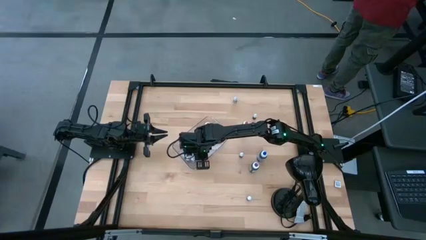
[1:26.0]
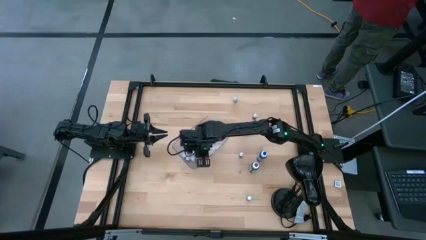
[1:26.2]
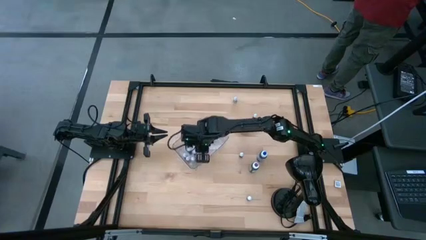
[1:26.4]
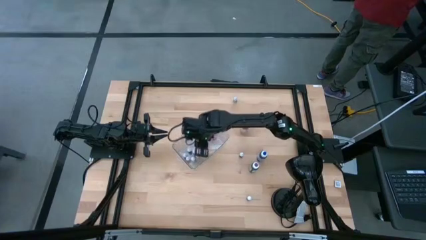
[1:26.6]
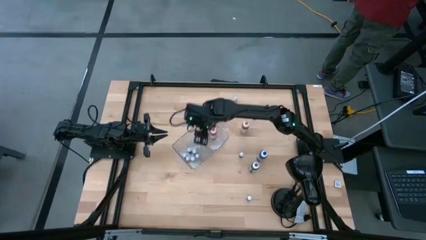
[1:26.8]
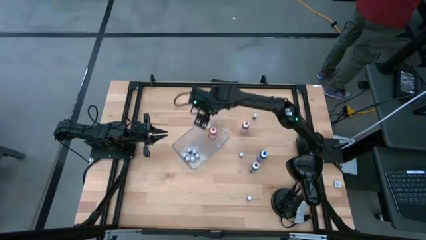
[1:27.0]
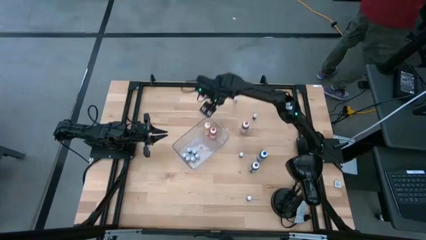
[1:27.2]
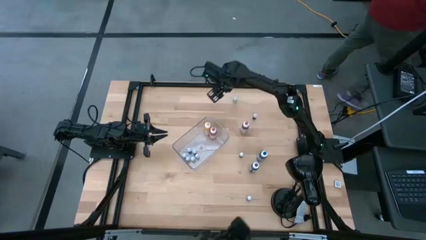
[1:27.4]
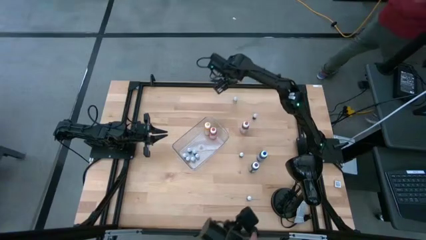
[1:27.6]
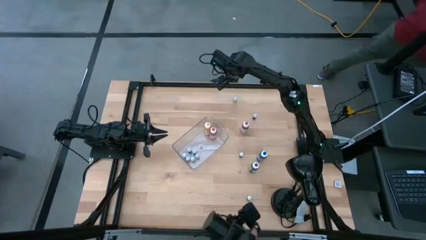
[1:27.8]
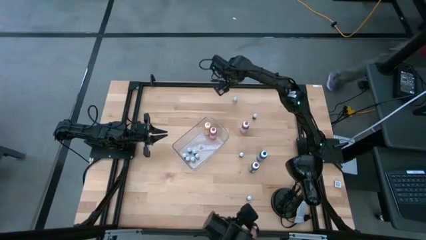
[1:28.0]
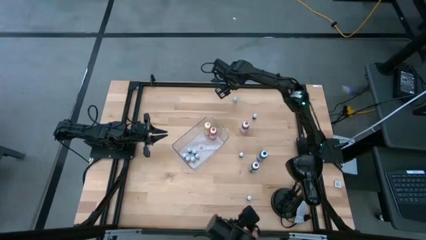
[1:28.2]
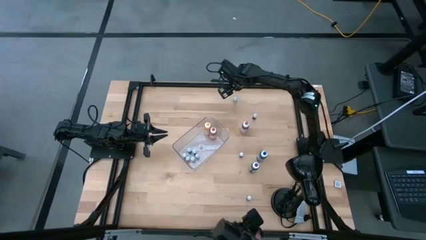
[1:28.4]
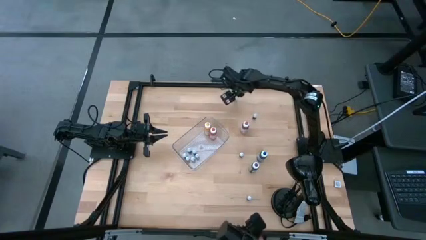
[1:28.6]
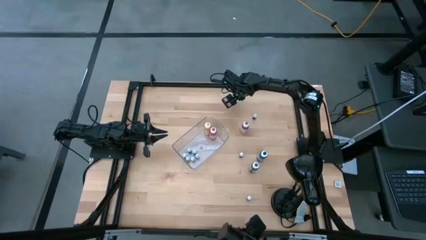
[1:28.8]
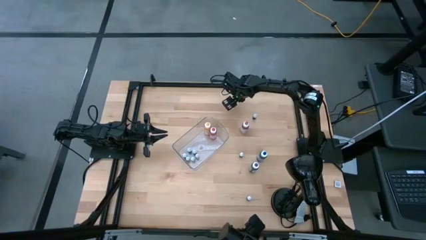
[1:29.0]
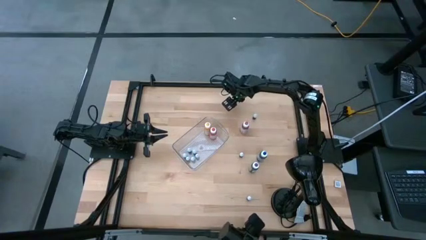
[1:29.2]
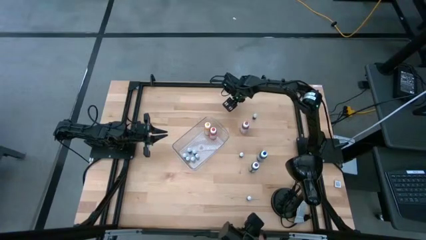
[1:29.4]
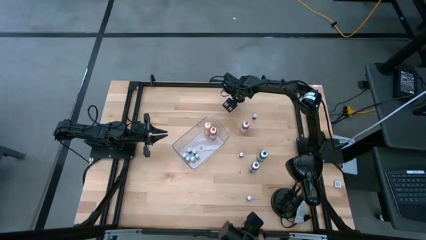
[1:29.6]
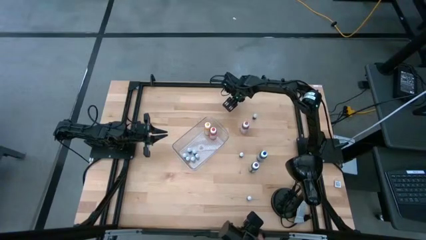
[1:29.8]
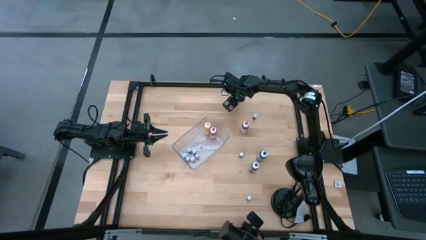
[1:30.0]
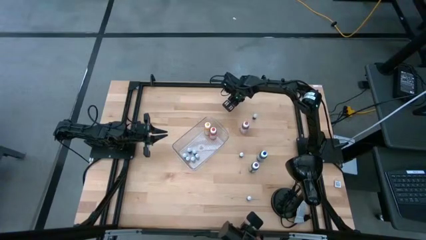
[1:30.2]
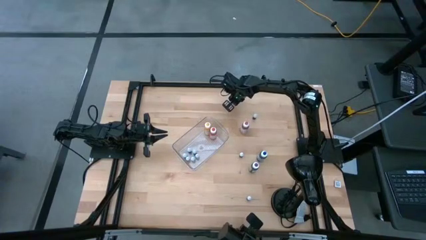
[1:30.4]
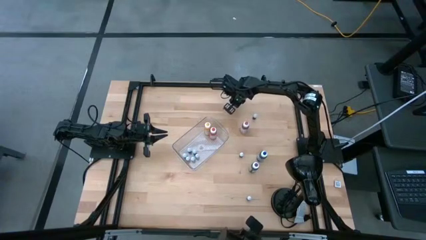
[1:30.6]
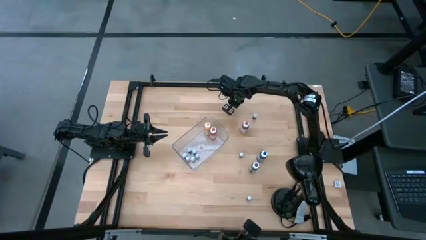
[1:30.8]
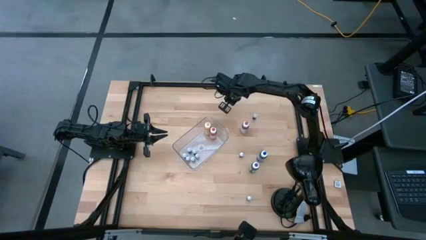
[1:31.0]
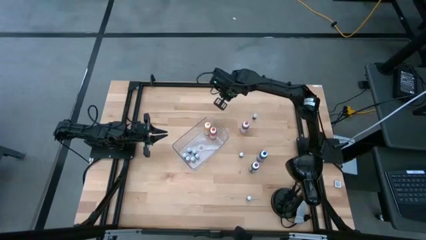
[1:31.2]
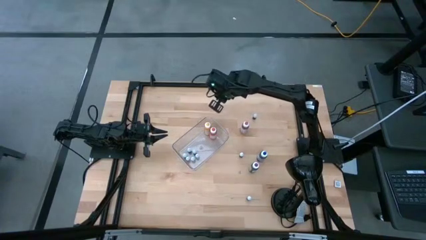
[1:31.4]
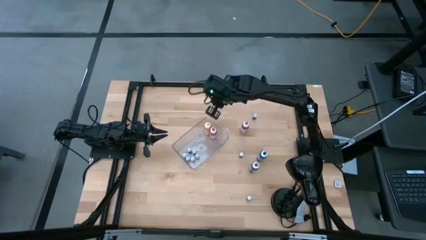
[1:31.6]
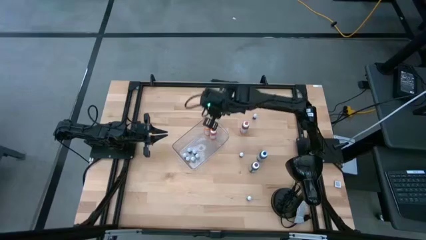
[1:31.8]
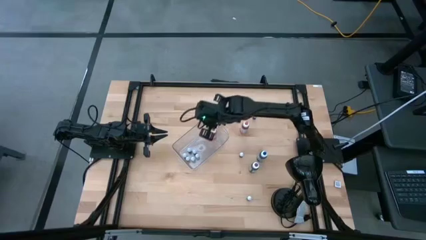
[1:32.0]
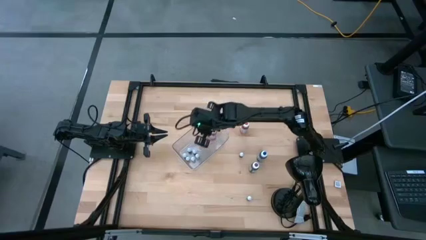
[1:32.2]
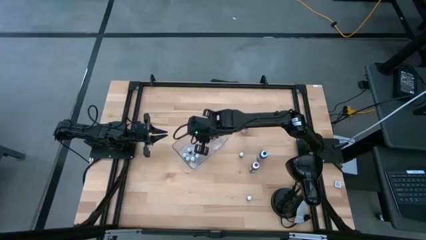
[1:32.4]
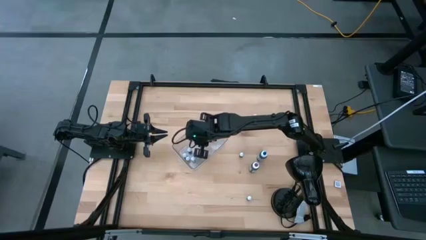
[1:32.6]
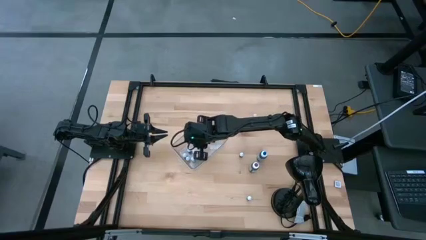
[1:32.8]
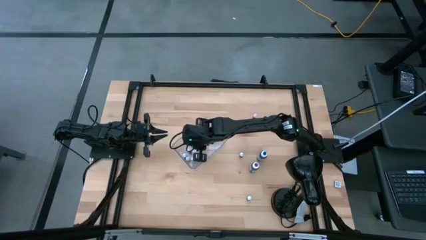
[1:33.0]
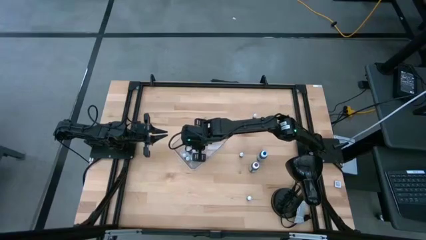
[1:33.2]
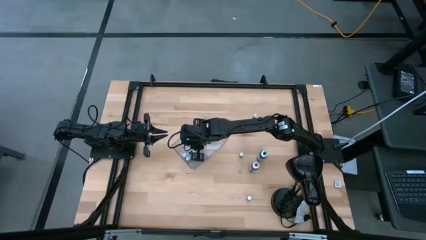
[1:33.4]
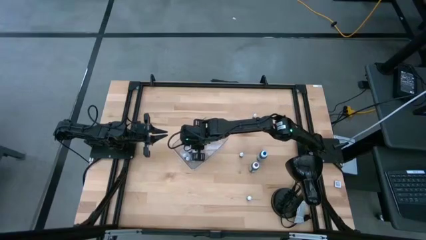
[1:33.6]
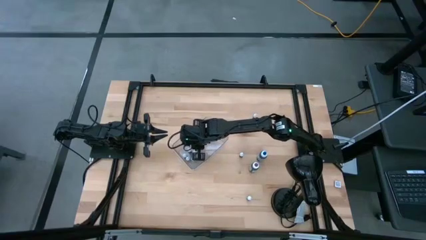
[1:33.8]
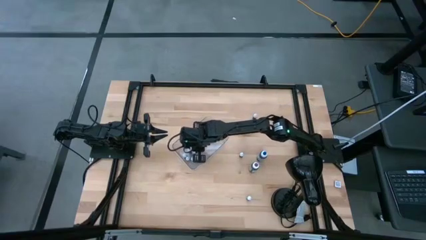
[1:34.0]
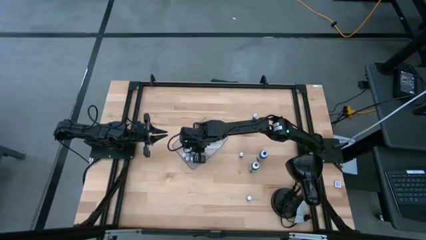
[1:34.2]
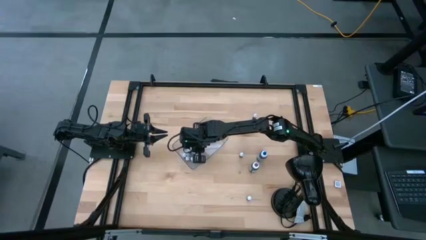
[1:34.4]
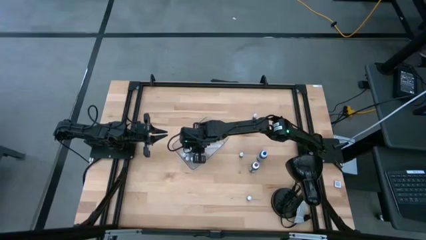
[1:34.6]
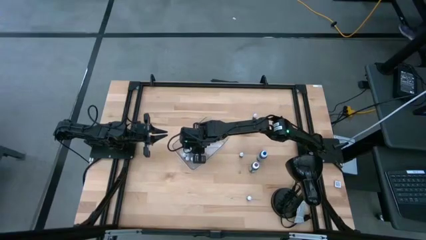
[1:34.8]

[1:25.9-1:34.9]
Task: Pick & Place food coloring
Put the small blue food coloring bottle into the transparent bin

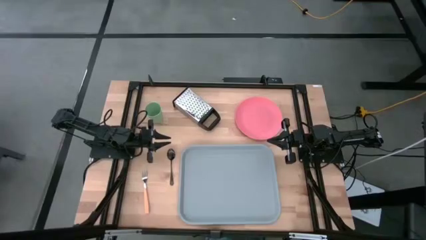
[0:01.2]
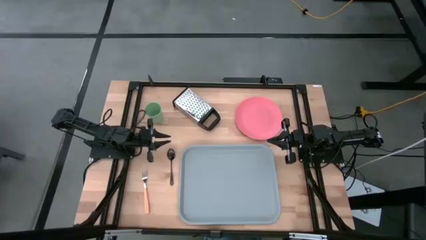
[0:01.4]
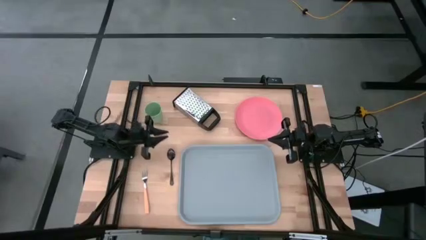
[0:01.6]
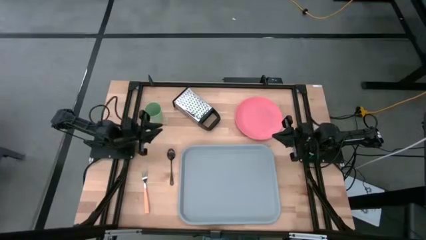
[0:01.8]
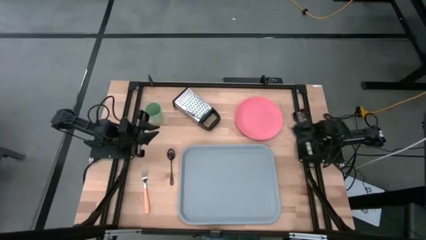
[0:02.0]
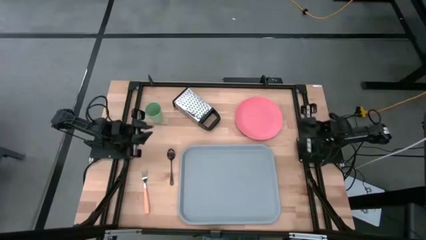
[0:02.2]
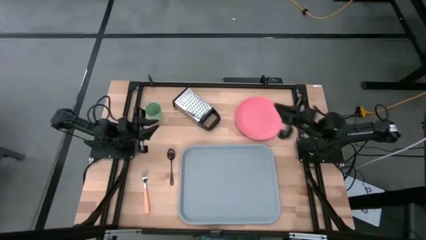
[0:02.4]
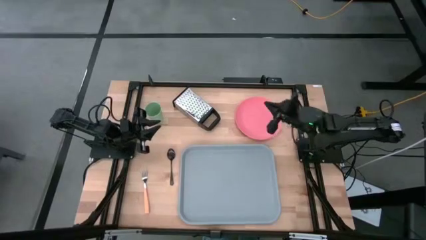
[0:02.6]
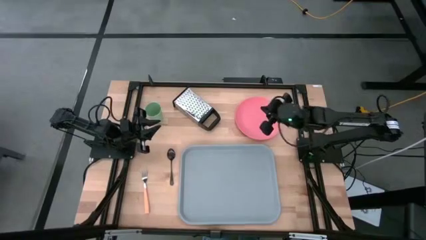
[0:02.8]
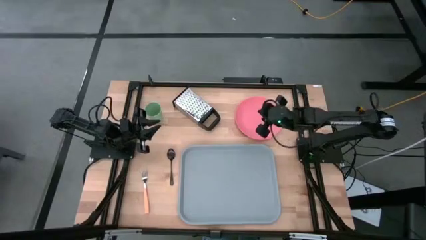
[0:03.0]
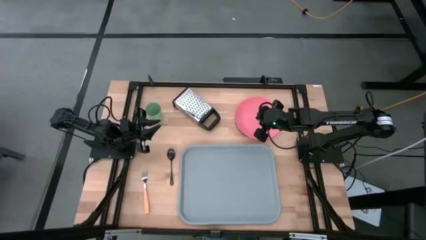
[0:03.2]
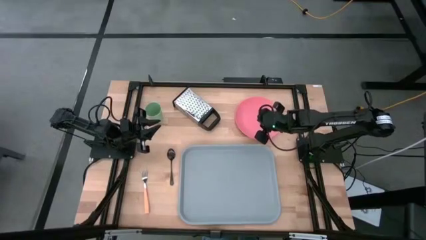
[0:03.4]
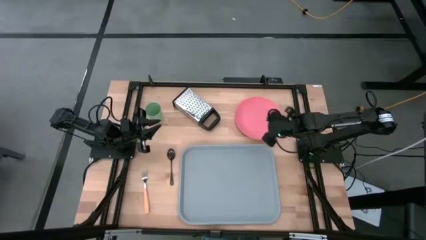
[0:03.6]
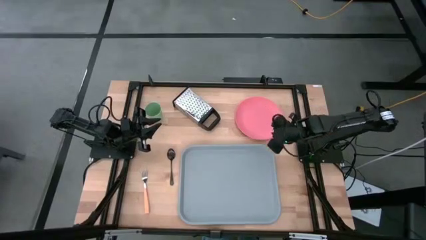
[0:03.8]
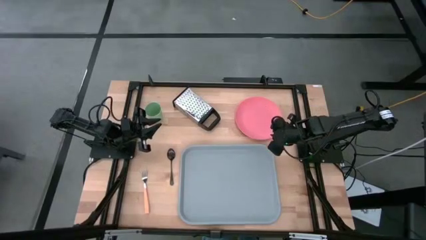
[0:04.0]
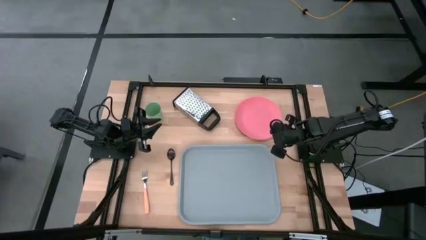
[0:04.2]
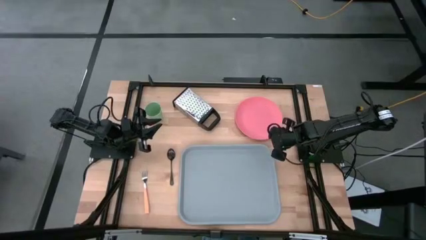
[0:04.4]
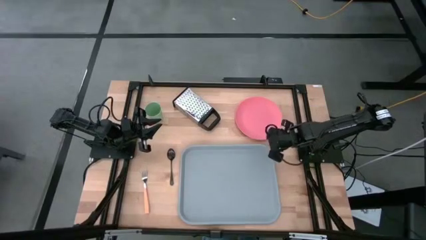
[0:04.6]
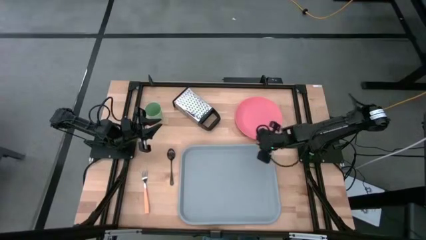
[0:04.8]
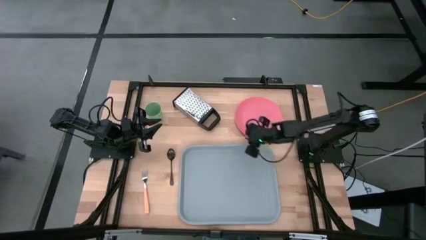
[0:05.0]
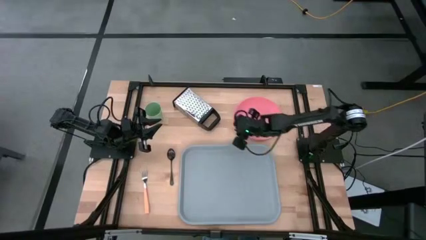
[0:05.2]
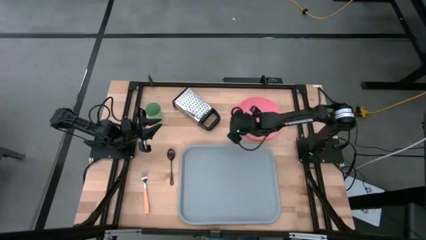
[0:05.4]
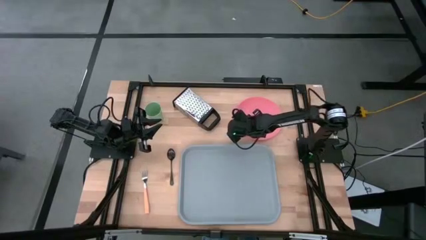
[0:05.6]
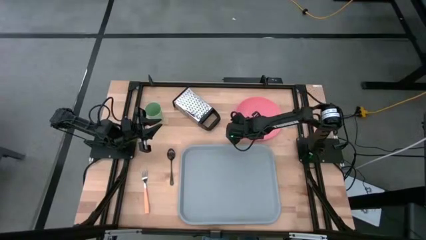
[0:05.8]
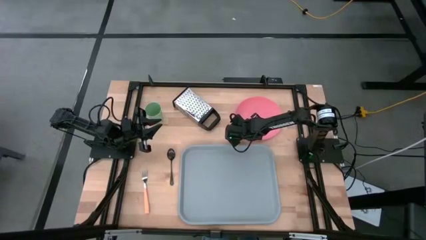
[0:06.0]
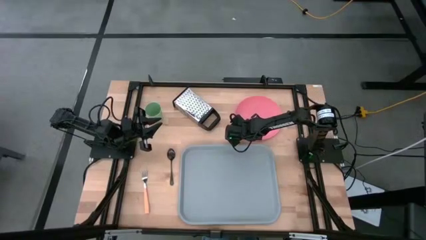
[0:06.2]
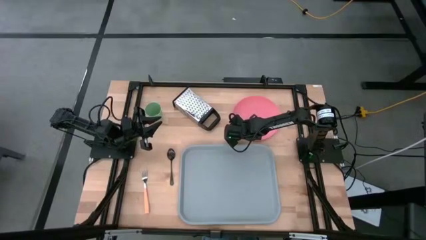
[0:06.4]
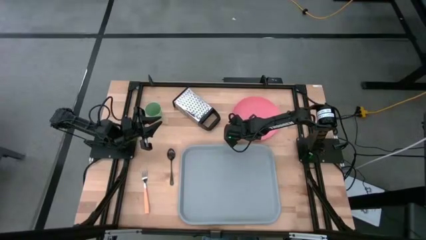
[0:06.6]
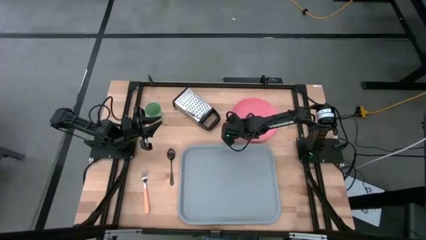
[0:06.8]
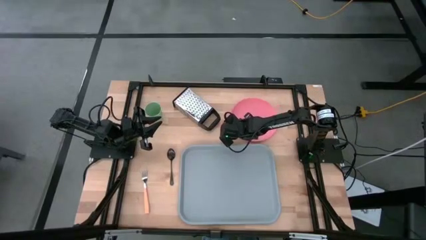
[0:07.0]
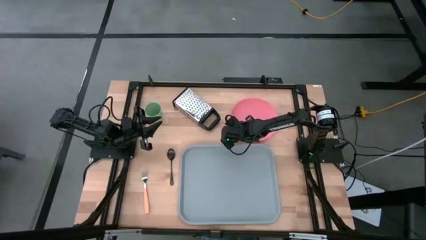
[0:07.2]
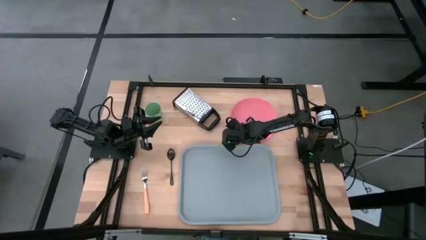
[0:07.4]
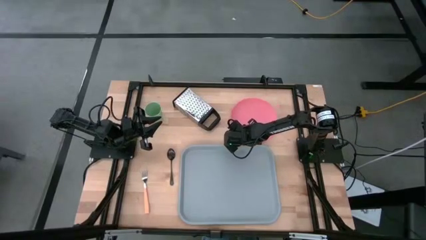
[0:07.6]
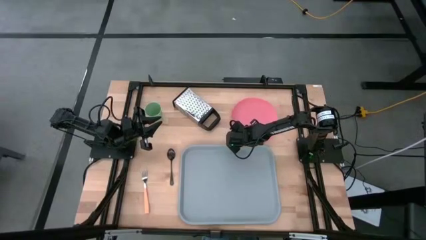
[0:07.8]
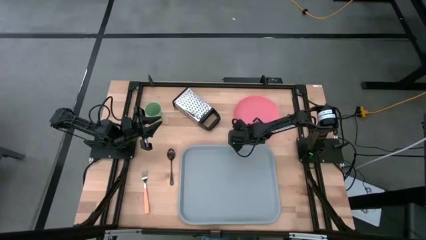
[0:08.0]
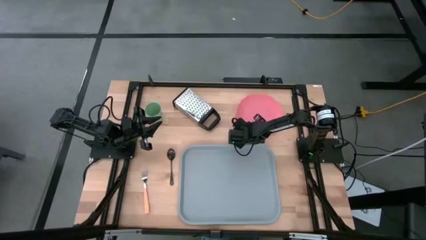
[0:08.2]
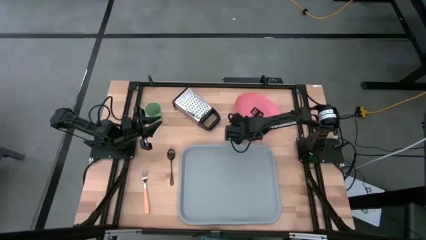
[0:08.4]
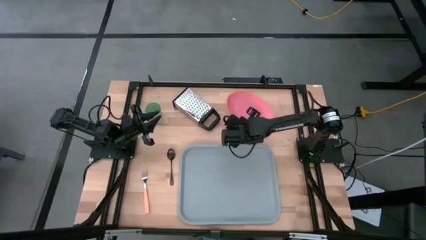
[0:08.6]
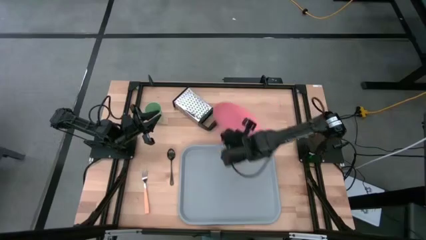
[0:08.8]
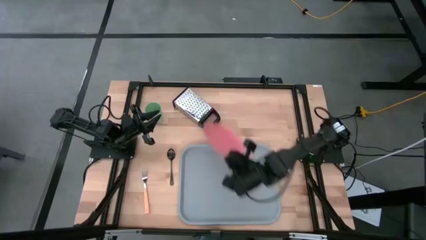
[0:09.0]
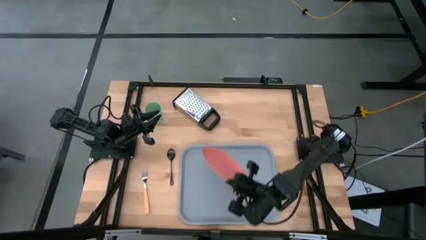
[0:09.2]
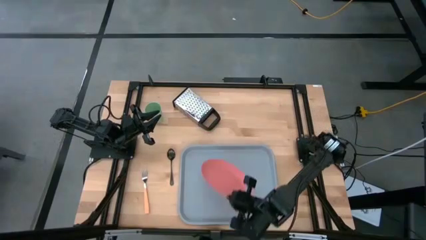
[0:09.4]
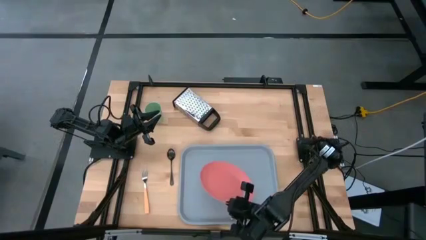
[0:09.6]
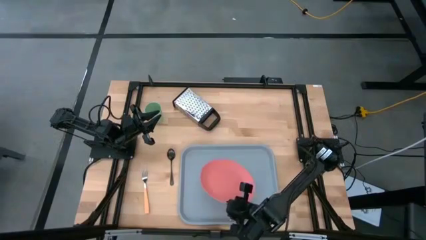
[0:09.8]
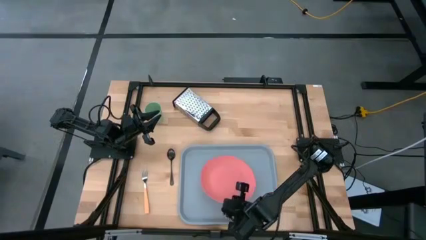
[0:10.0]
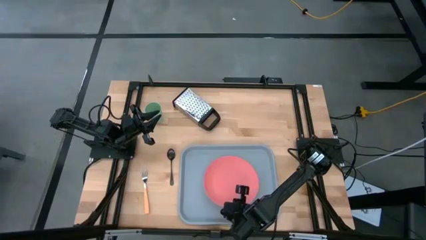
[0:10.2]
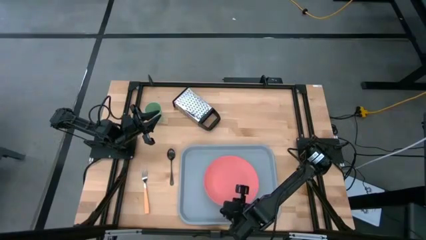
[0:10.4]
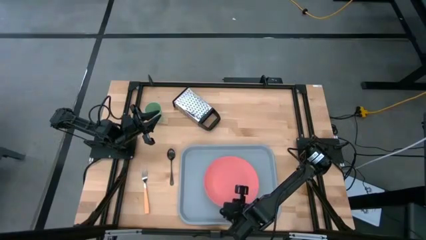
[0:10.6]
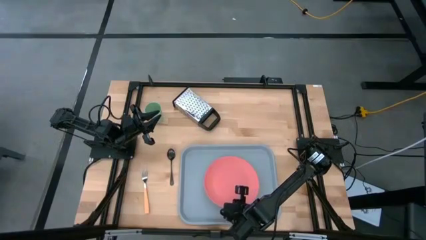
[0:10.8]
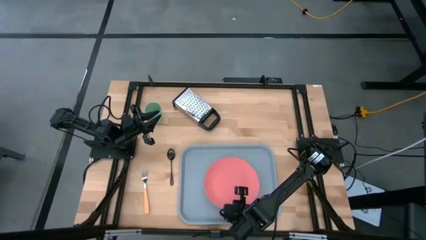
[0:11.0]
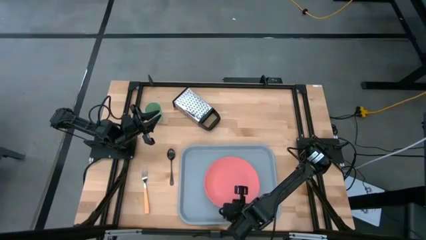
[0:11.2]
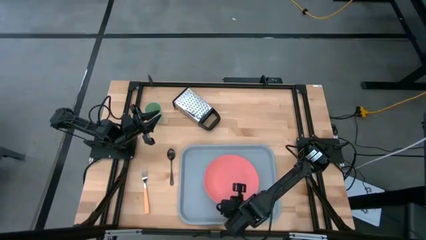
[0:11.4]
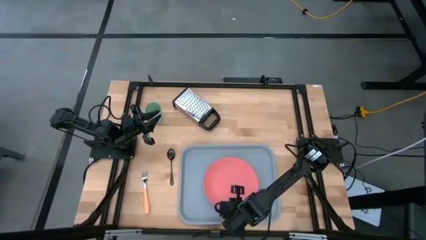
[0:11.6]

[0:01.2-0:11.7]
Task: Pick and place plate/cup/fork/spoon on tray
Put the plate on the serving tray
